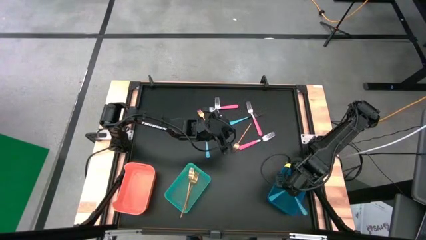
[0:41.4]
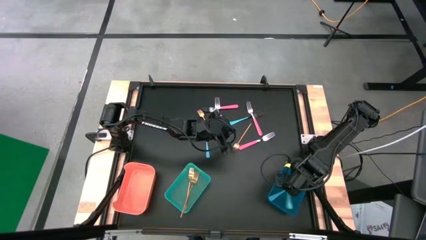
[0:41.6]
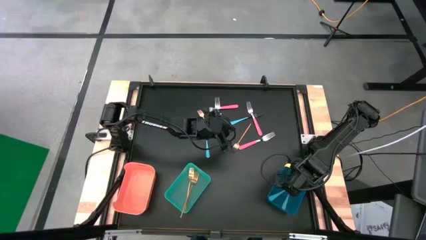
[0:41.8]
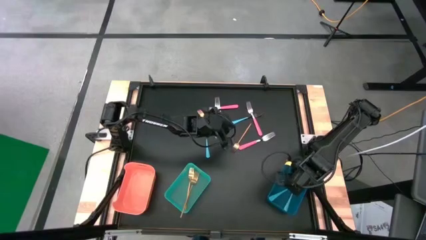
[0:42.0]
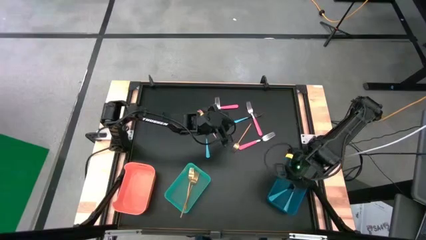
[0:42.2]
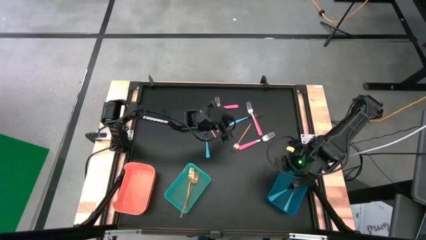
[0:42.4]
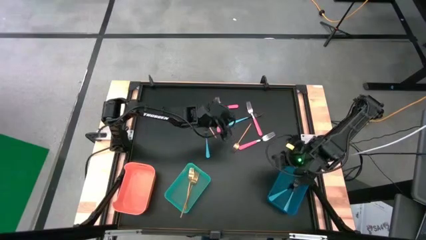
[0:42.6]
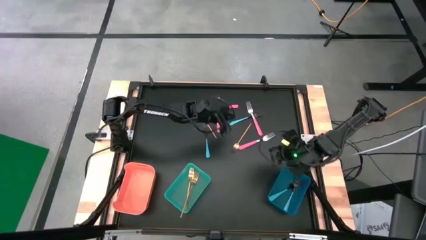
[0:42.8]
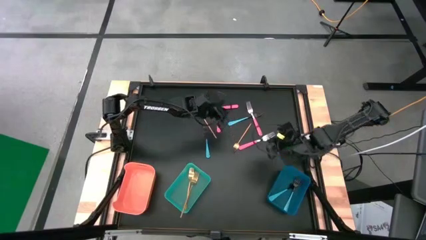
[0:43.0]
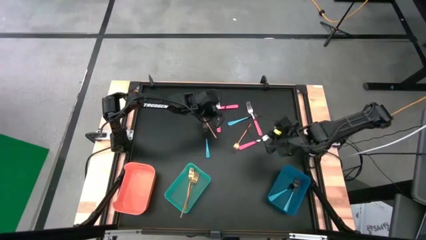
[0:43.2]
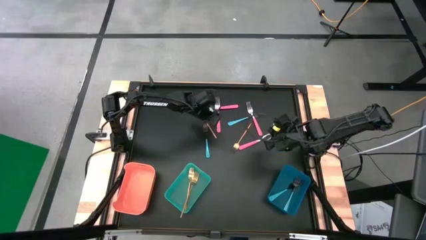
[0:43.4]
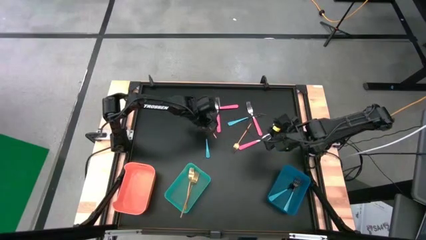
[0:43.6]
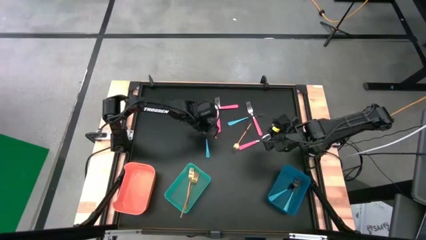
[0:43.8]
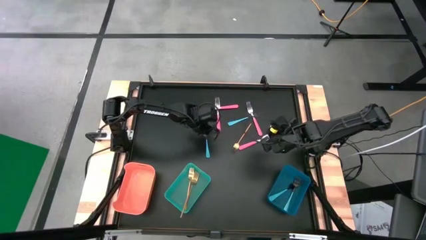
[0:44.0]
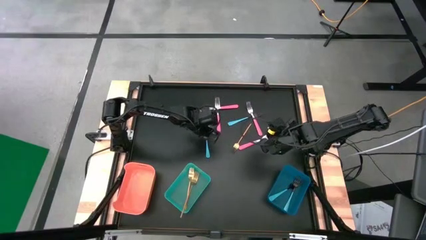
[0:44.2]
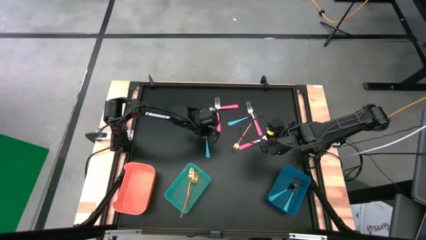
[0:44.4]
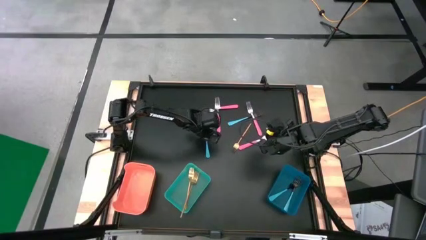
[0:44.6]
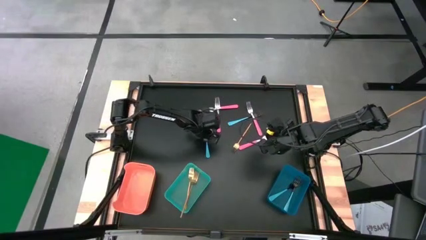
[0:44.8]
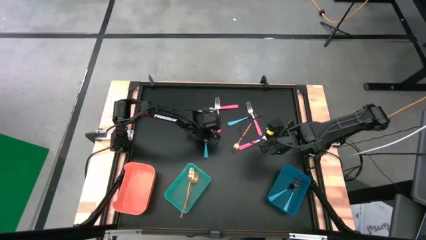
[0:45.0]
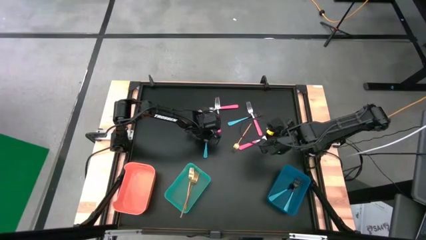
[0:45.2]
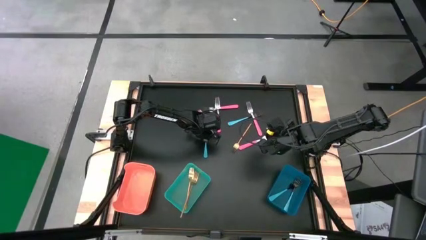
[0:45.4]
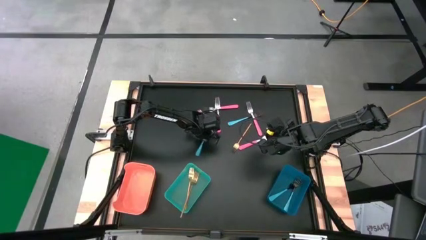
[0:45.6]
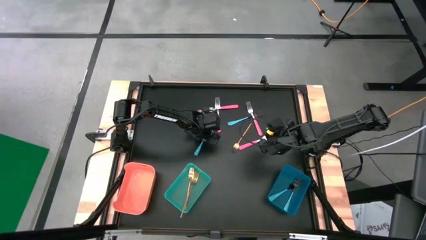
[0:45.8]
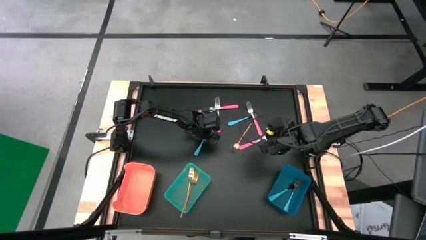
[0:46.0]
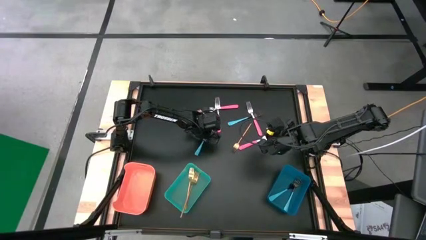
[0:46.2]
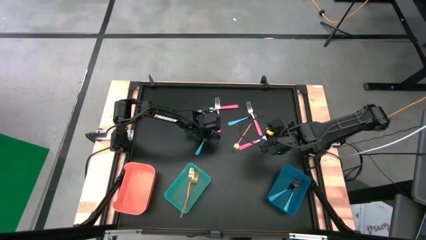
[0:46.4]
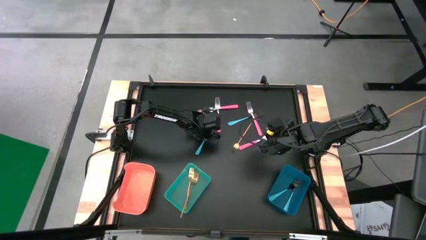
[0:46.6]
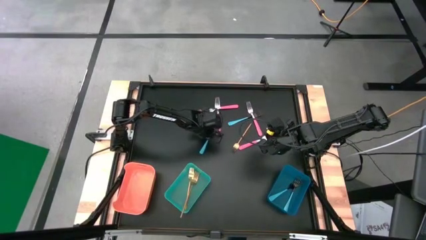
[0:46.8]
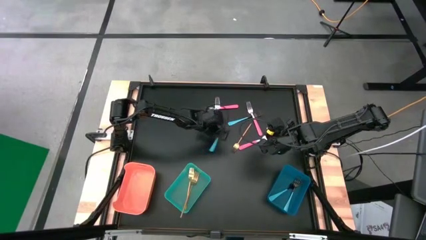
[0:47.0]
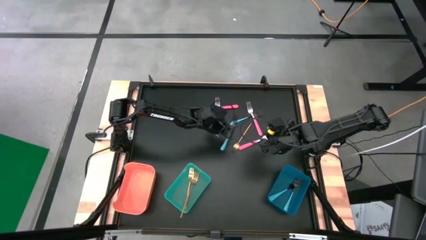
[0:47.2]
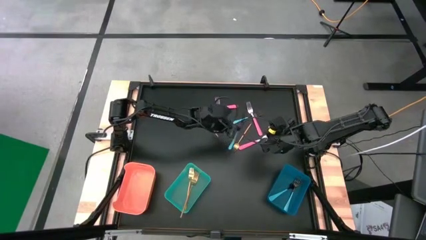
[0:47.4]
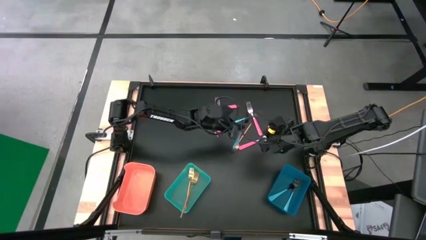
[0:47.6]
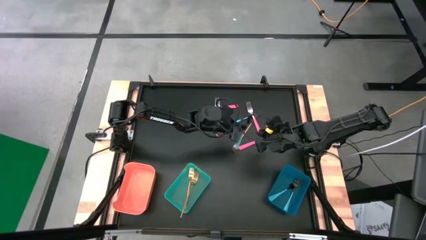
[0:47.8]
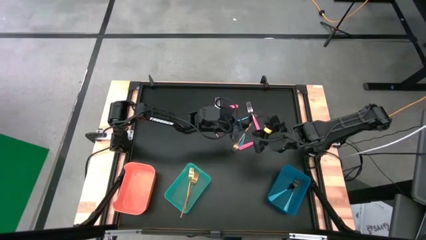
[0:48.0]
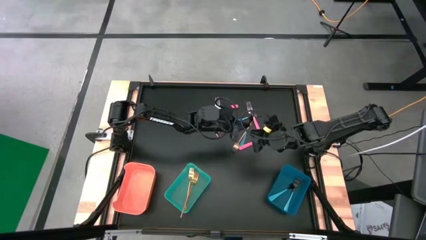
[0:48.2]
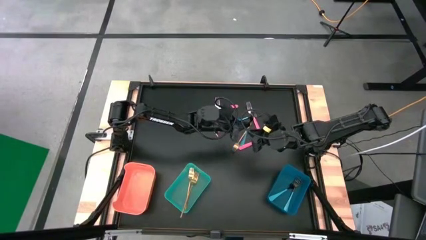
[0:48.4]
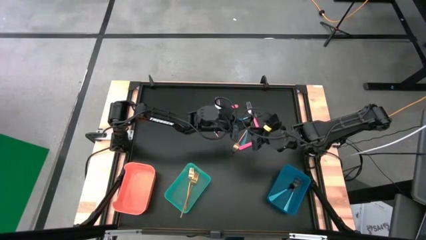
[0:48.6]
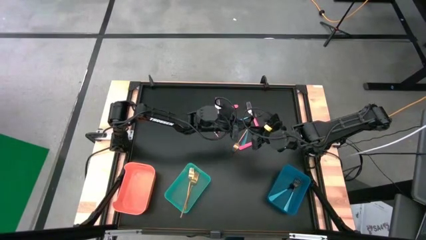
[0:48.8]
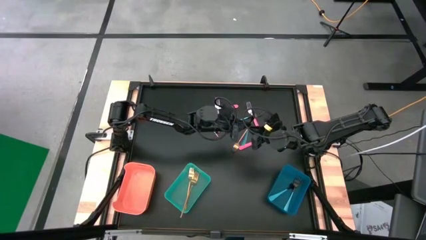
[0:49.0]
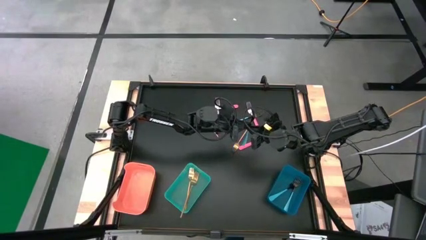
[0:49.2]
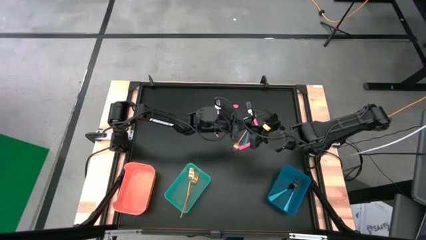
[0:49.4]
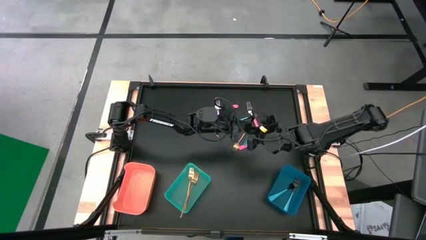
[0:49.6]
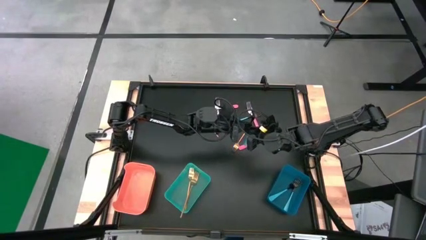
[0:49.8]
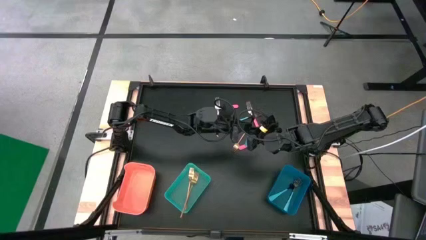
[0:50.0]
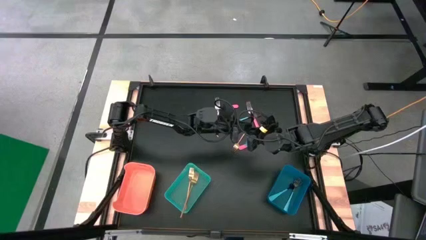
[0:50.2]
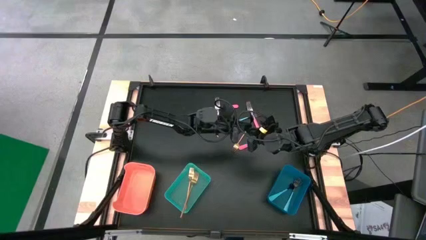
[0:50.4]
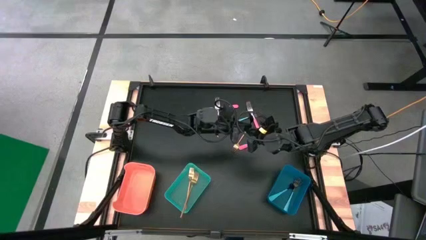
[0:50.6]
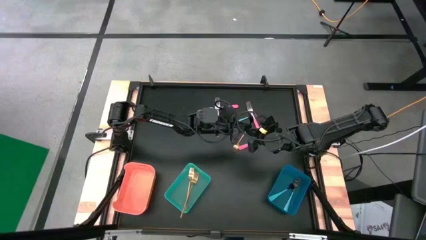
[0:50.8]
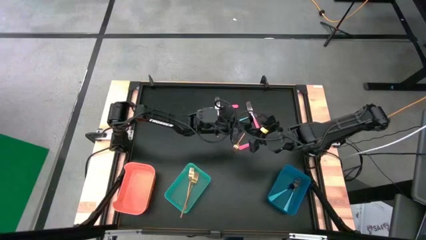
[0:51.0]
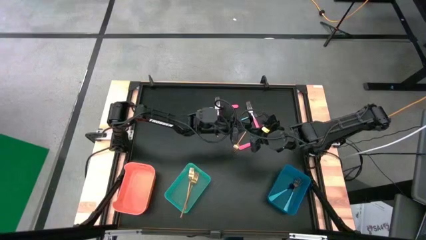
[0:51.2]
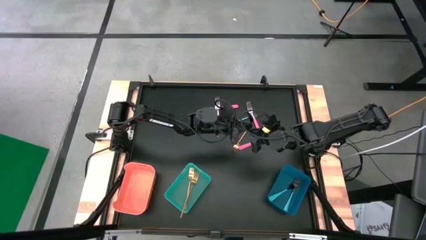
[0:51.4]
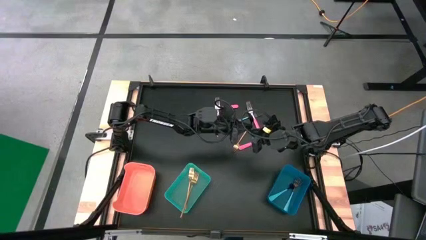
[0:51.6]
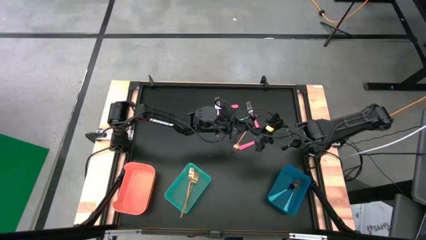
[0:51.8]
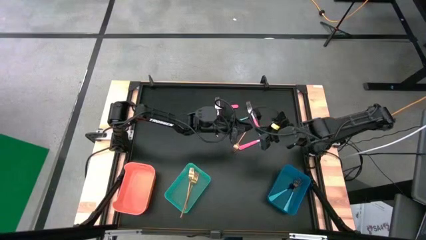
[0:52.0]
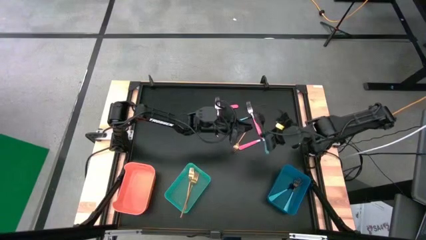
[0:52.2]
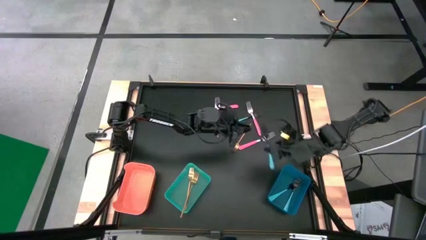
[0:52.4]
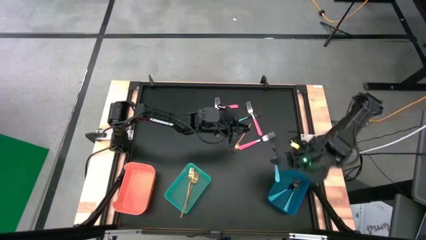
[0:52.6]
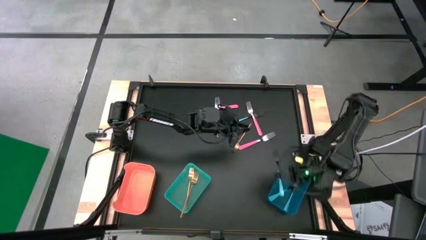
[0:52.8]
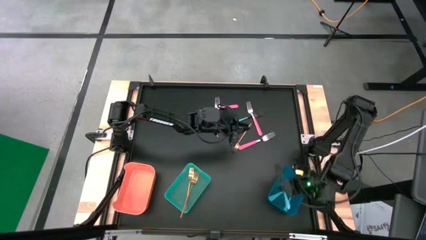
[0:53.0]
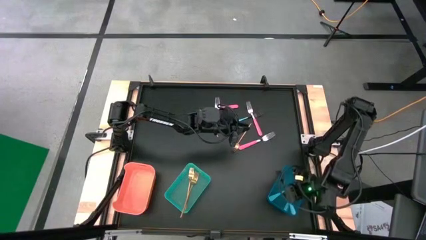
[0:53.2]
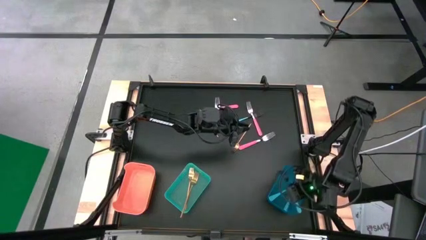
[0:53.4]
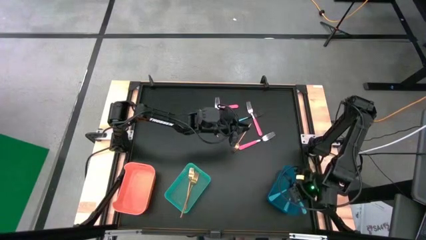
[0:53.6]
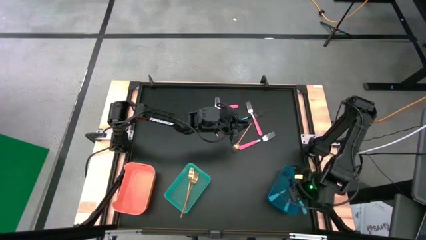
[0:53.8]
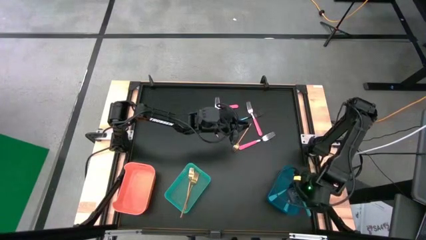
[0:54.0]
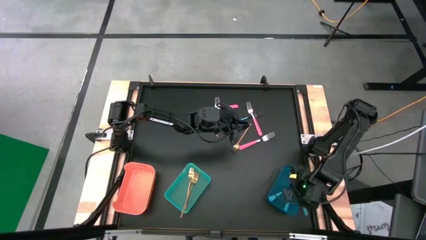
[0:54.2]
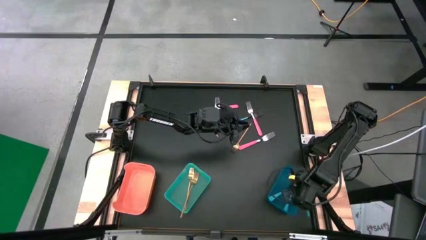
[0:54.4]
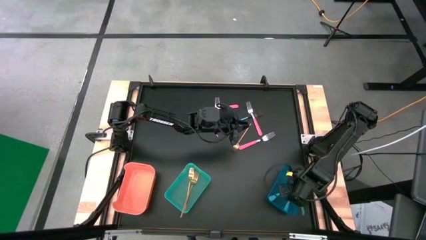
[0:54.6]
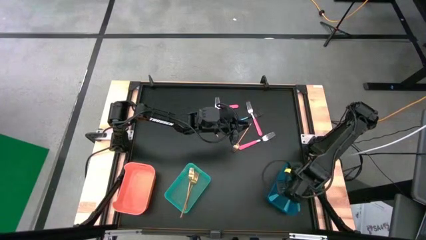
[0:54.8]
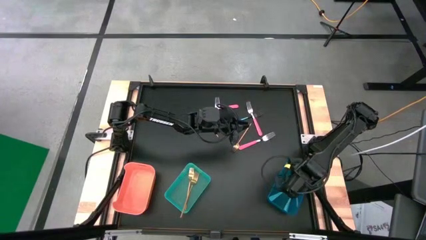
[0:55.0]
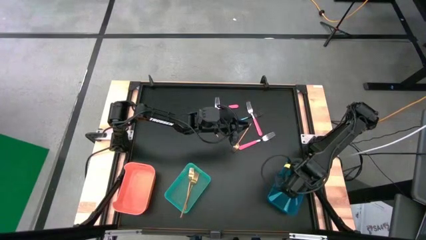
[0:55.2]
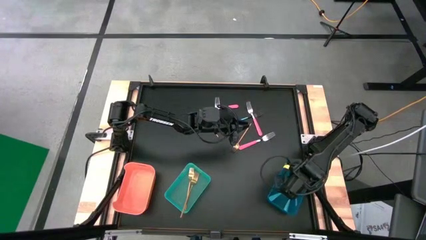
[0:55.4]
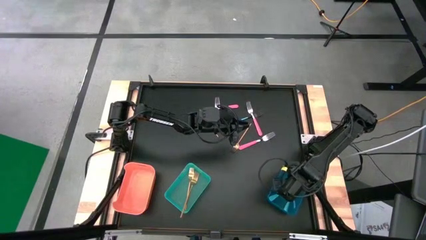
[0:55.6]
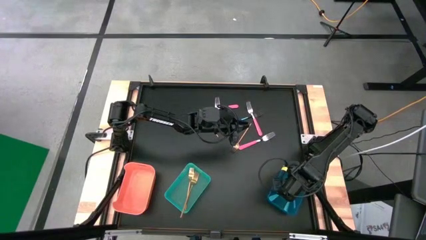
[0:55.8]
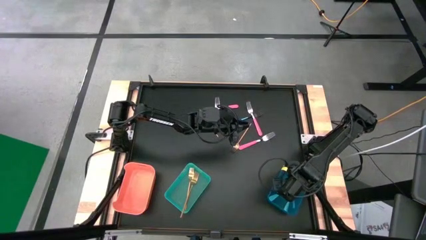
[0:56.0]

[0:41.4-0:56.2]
Task: Sort silverware by color (type)
Put the blue fork into the blue bin
